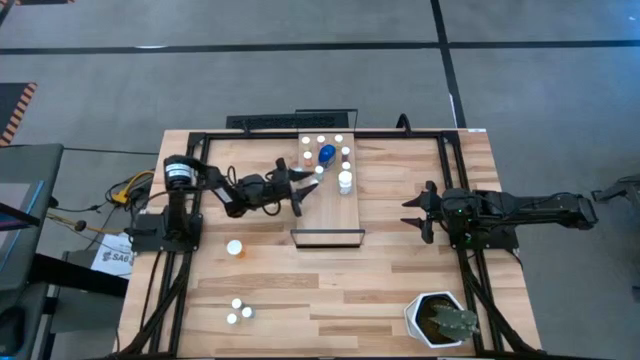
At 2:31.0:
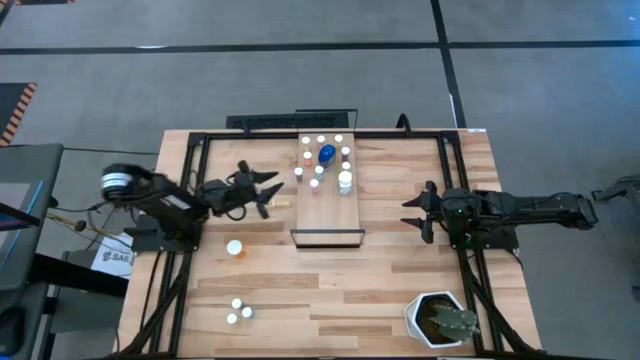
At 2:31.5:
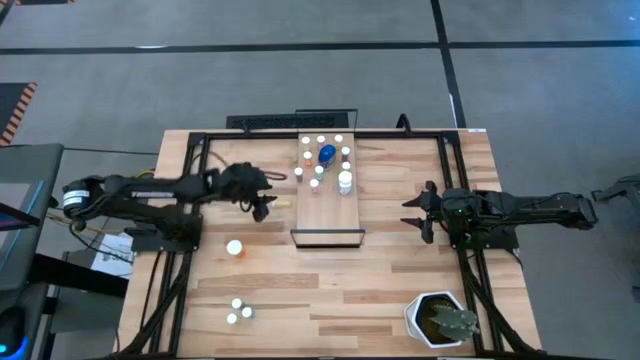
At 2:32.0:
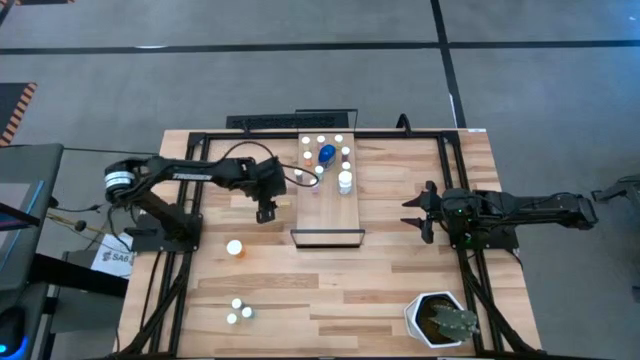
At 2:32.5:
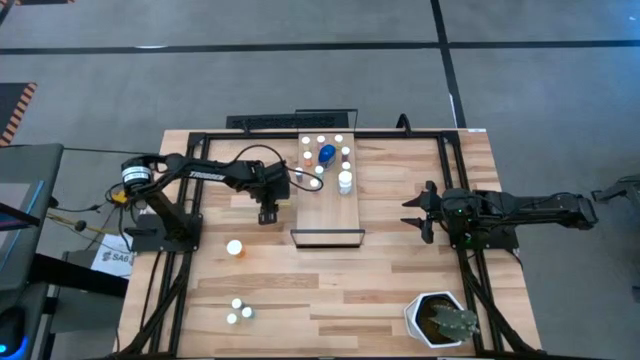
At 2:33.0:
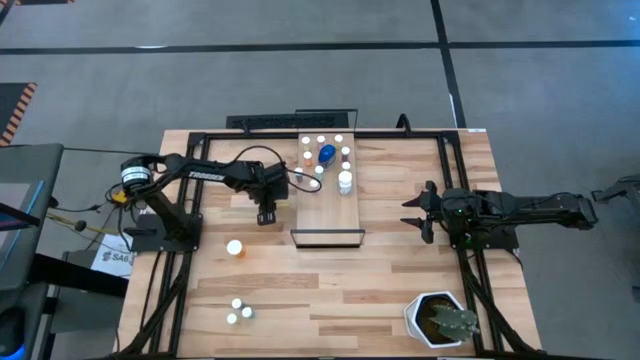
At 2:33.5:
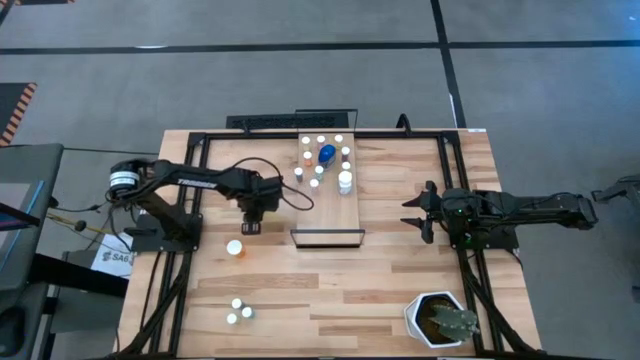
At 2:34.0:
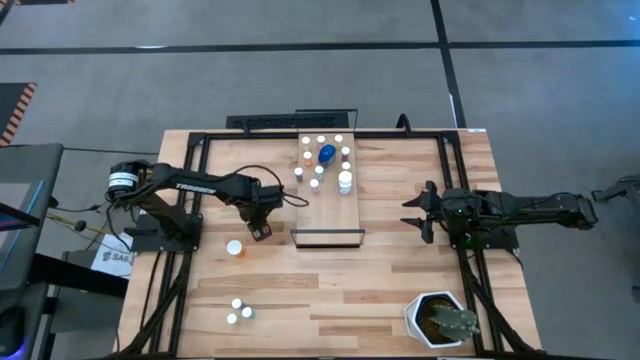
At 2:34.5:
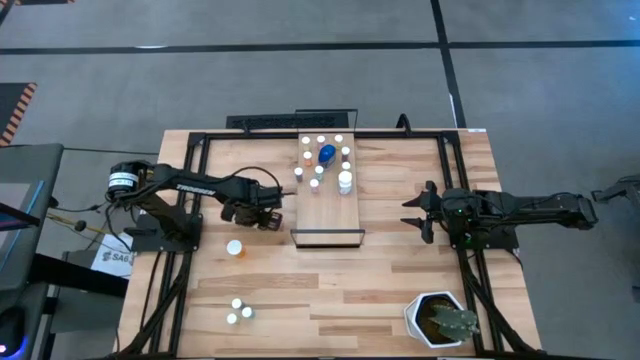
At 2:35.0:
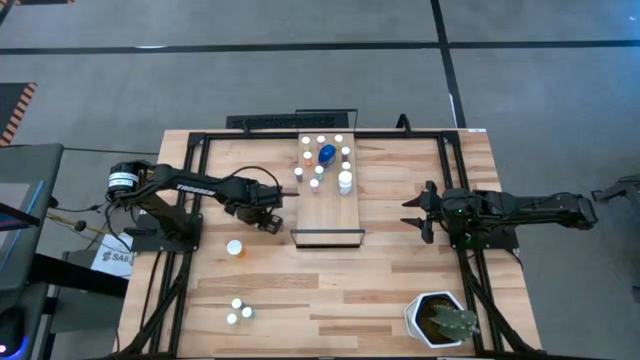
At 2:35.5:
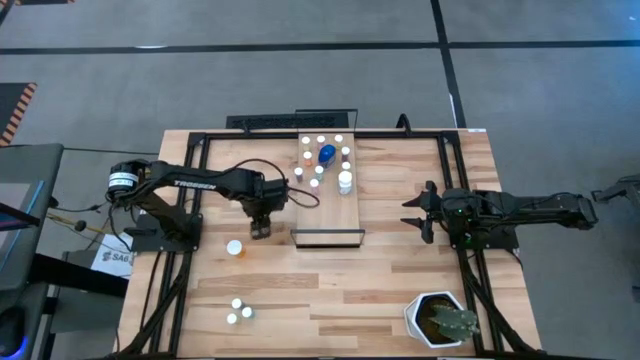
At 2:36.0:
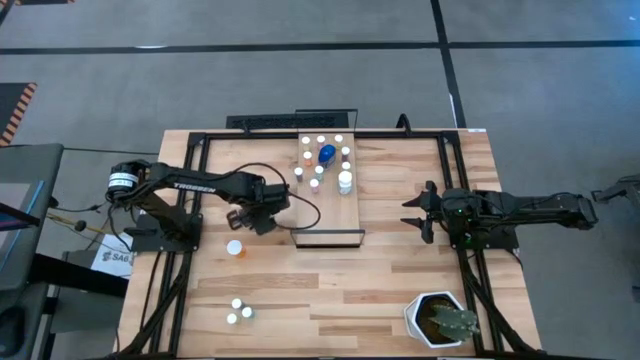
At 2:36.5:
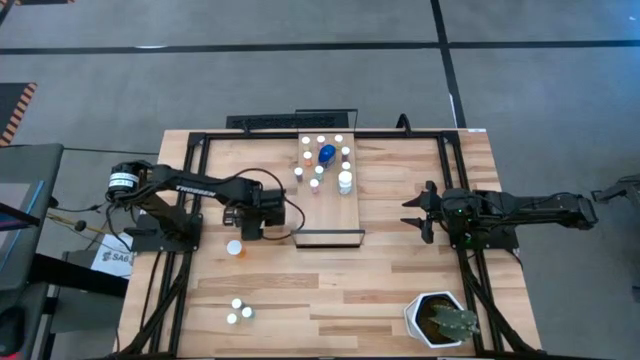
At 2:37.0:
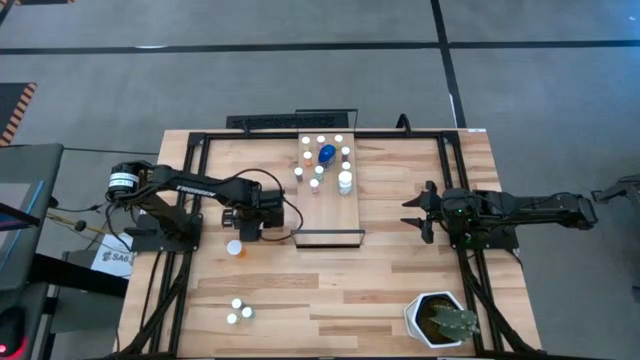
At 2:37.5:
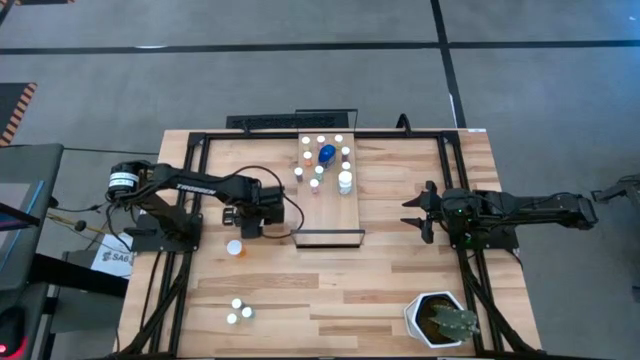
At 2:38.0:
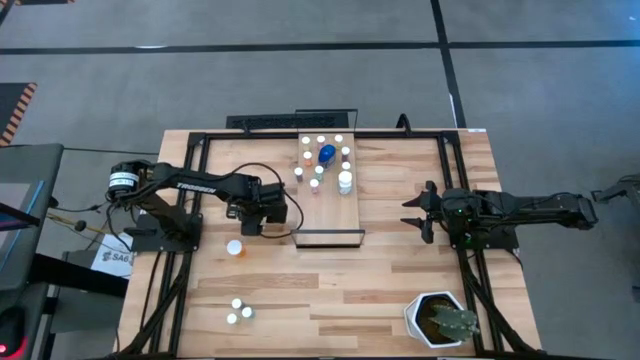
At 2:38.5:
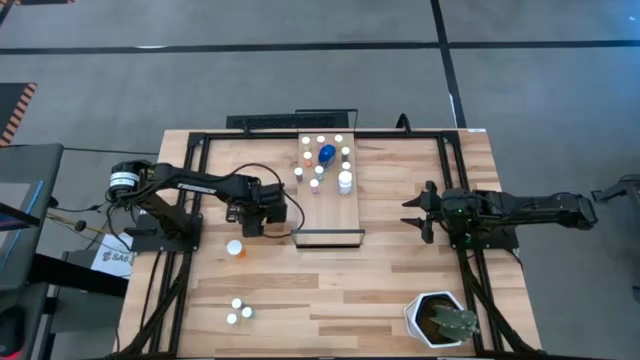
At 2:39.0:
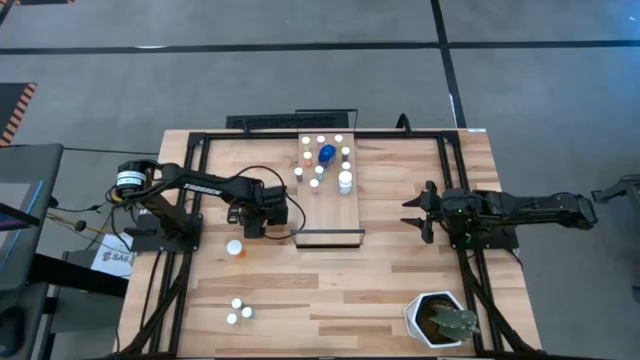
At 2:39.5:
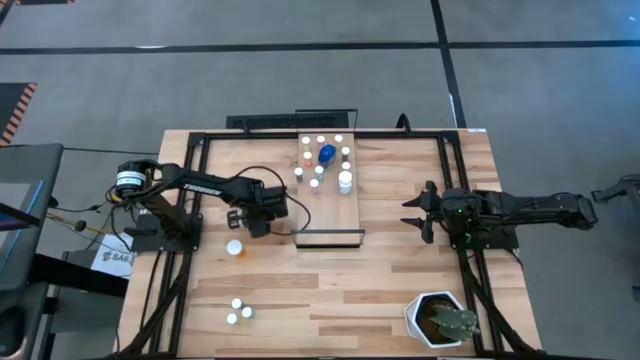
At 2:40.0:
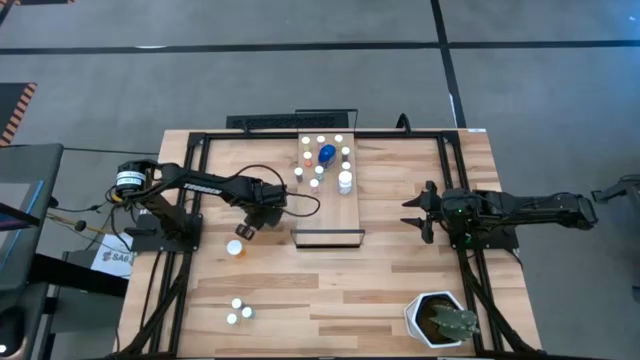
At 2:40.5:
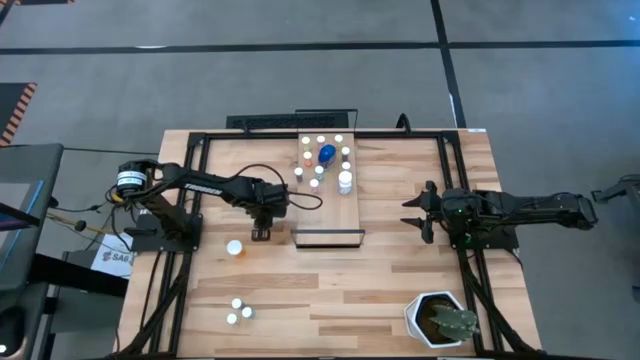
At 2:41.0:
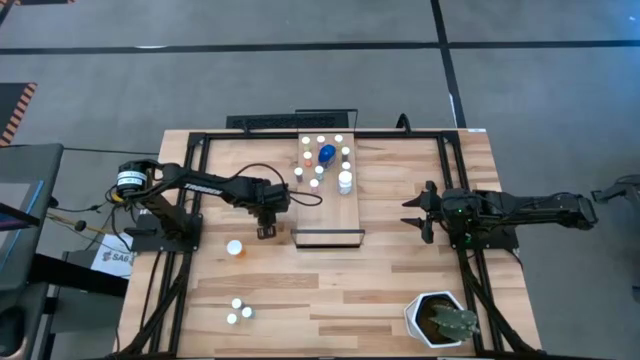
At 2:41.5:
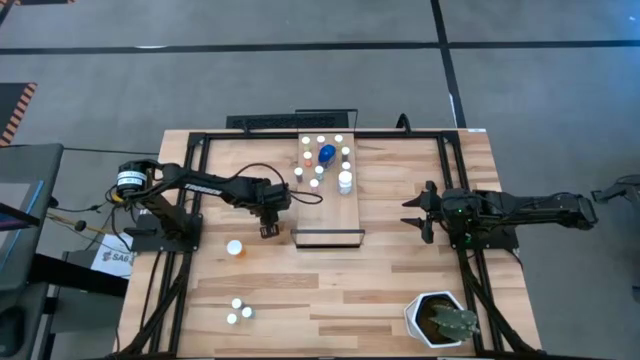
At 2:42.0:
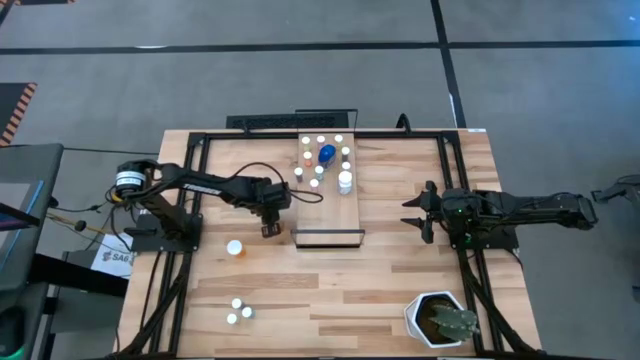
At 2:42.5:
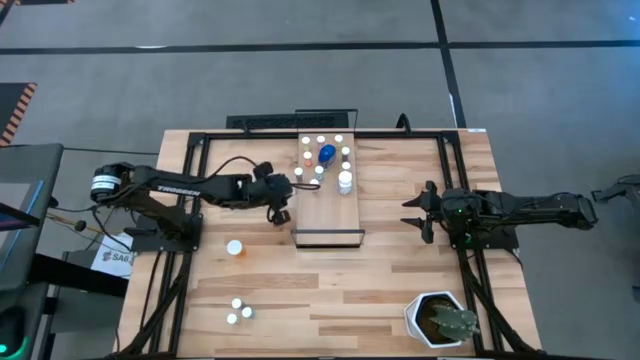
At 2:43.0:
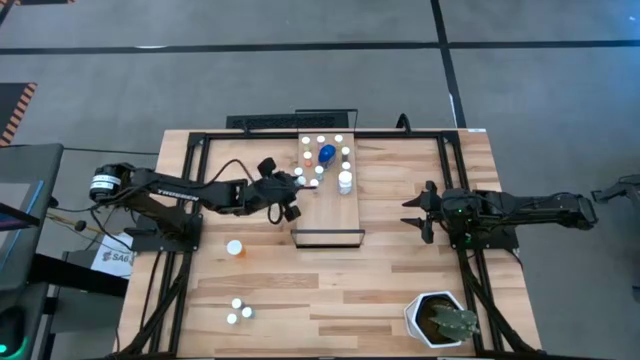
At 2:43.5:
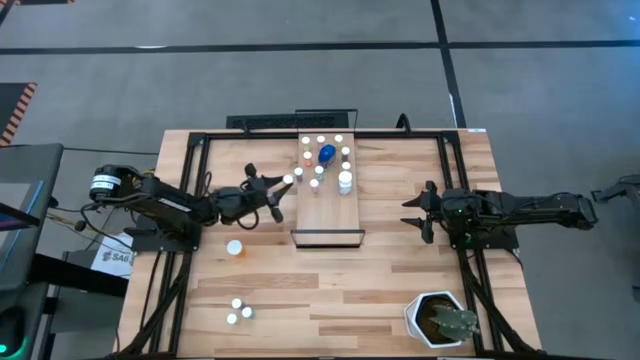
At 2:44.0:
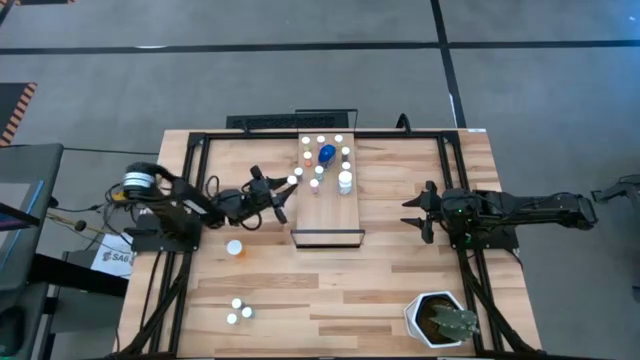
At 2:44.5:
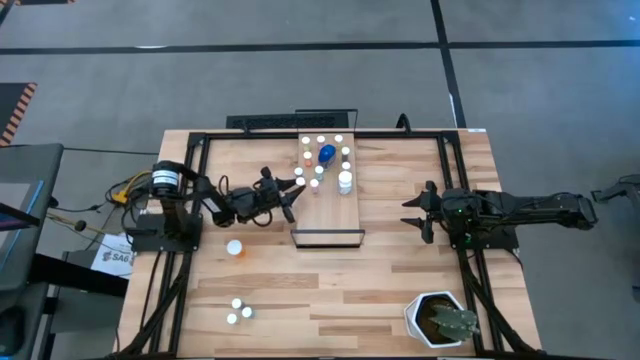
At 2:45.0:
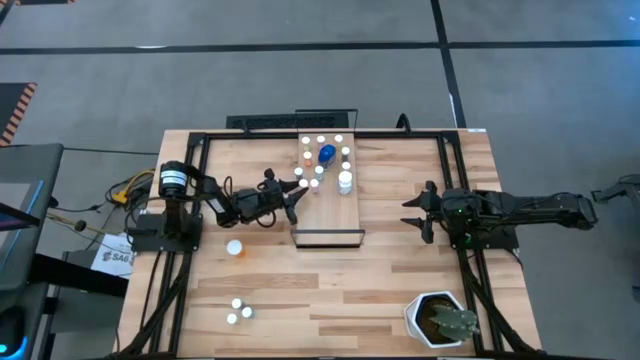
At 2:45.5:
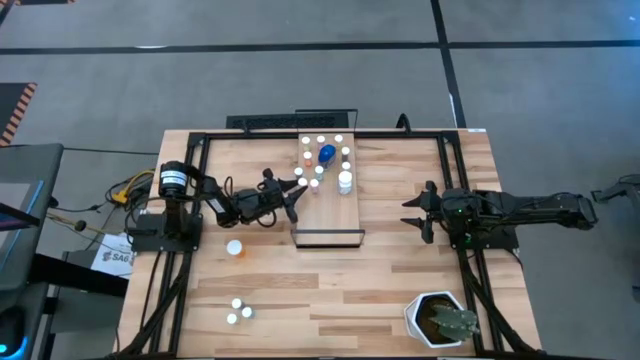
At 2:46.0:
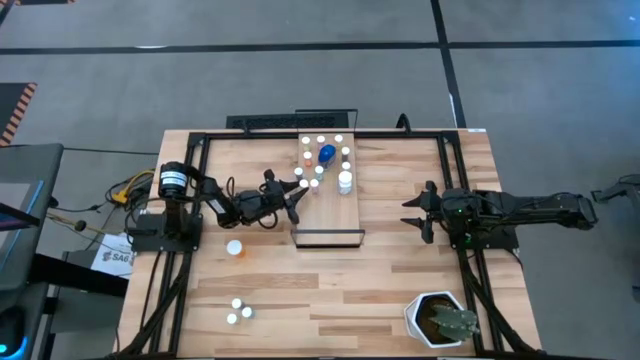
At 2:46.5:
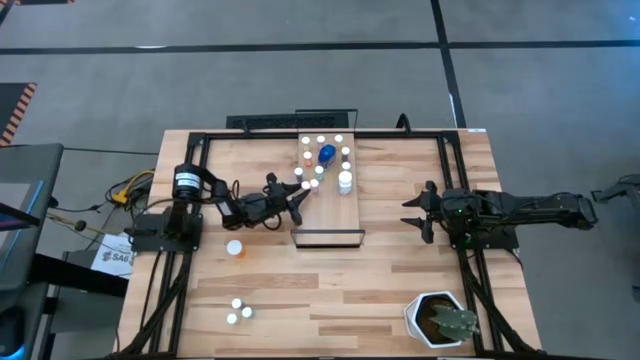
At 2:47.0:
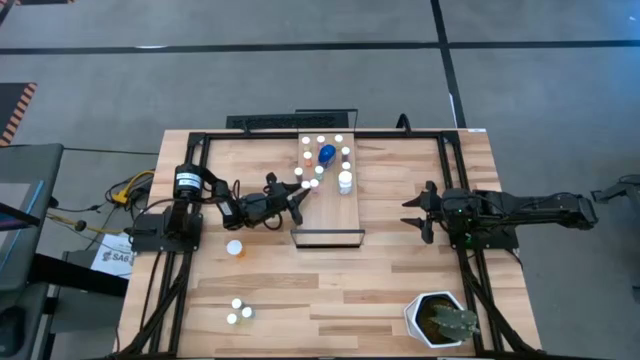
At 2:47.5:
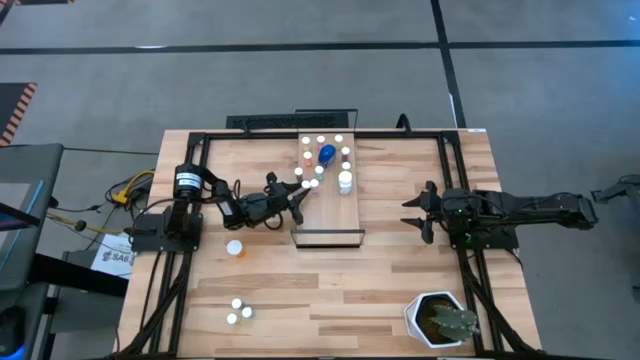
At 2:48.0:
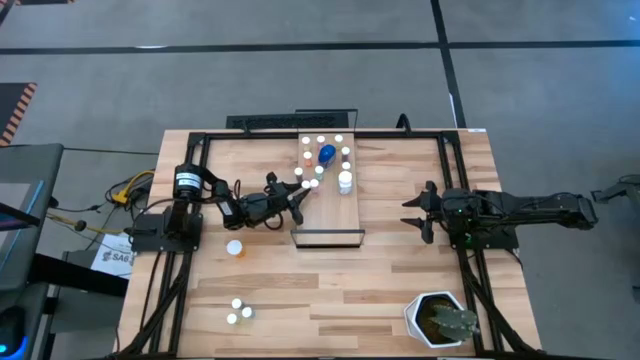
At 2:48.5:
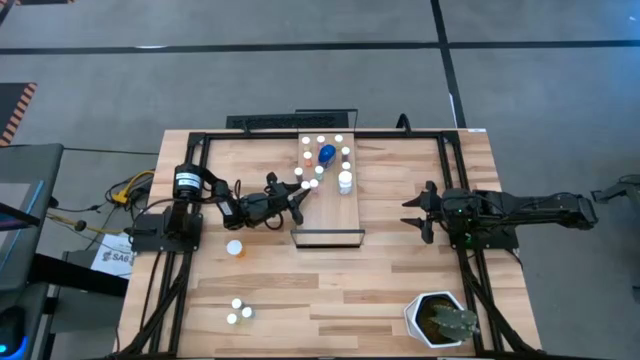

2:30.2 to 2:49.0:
Task: Pick and place medicine bottles onto shelf by color
Put the yellow pill bottle on the shelf

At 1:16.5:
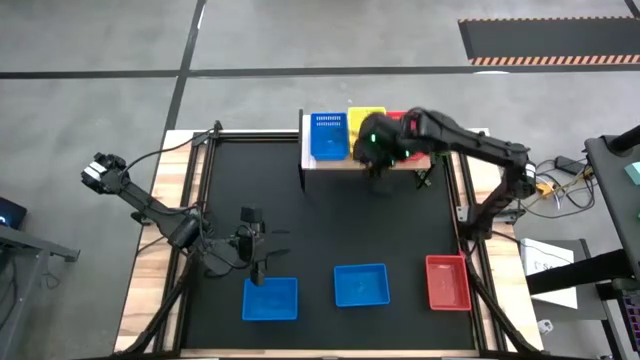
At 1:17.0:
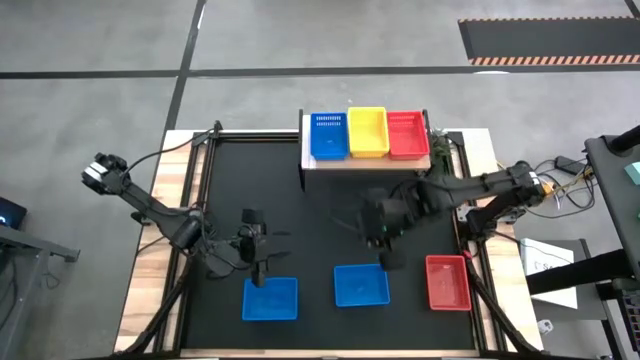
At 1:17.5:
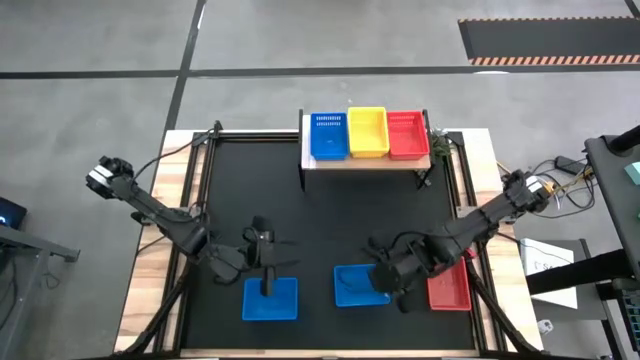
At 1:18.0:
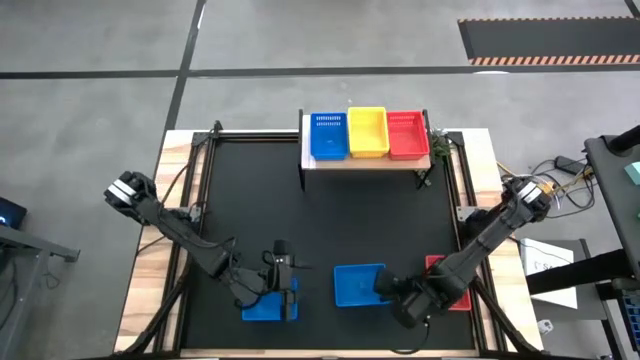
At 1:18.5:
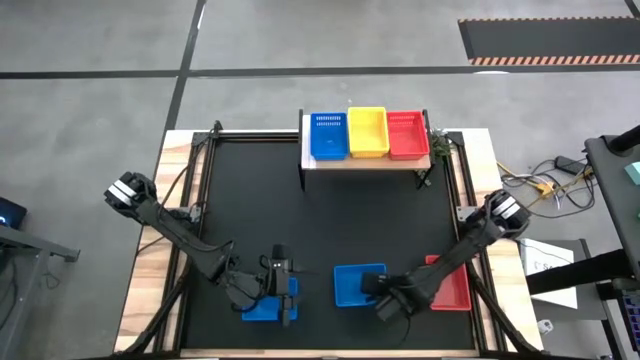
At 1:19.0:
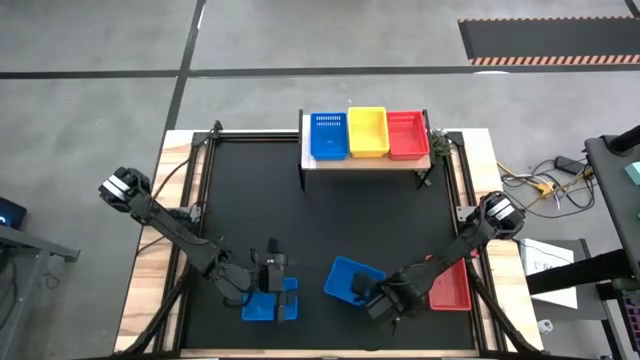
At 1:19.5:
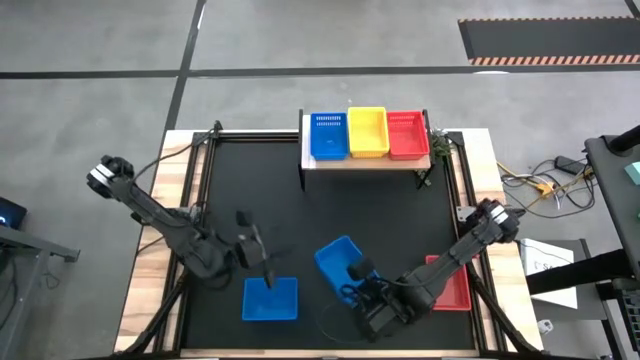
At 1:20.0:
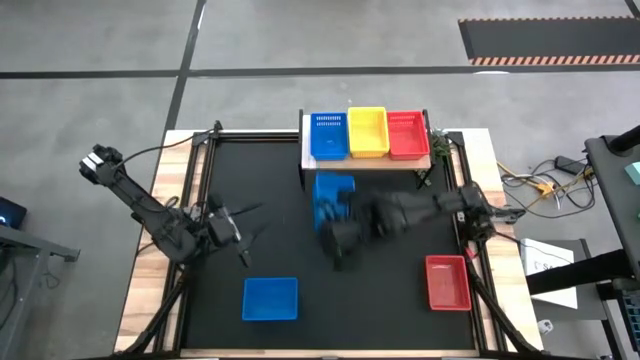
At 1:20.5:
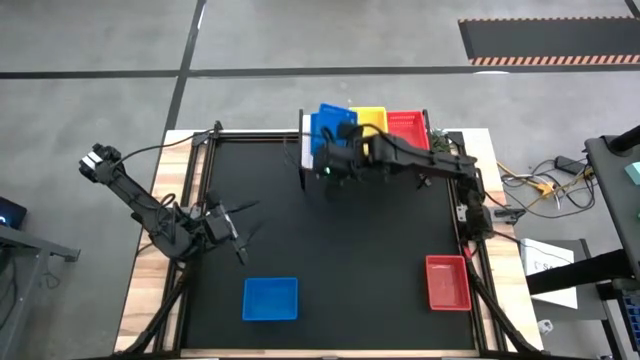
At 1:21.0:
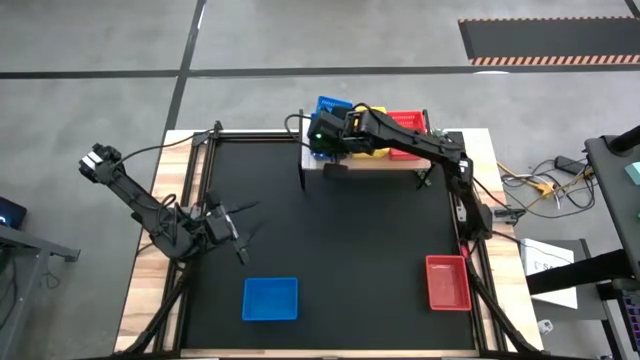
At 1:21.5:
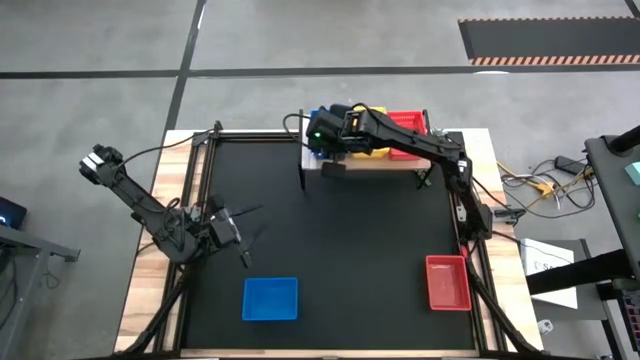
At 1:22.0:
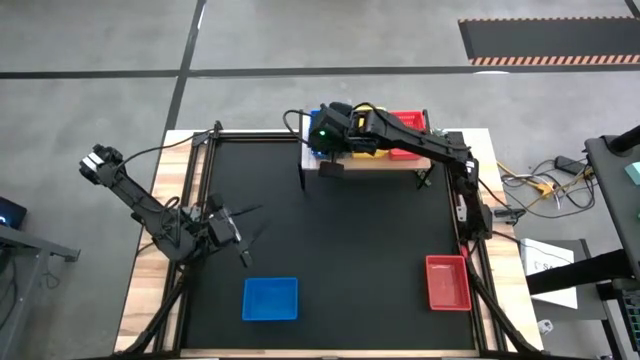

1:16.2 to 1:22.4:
Task: Stack baskets on shelf by color
Stack the right blue bin on top of the blue bin on the shelf
